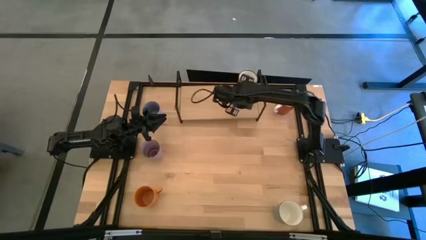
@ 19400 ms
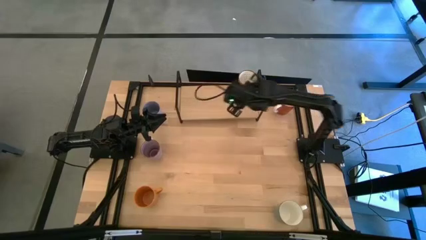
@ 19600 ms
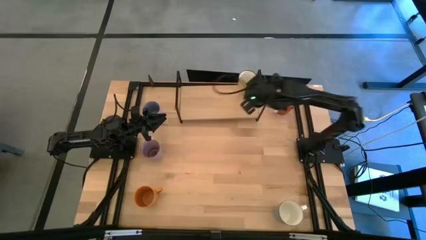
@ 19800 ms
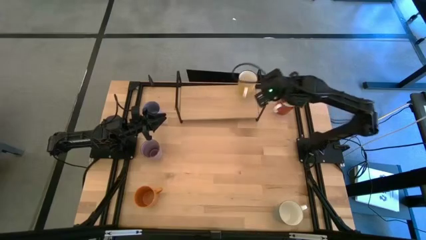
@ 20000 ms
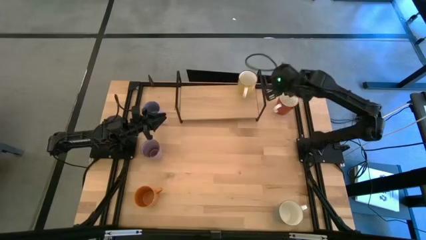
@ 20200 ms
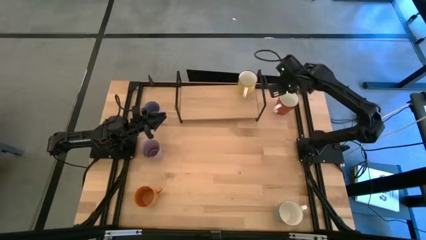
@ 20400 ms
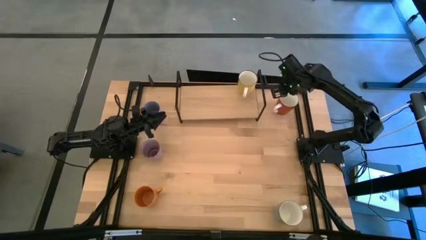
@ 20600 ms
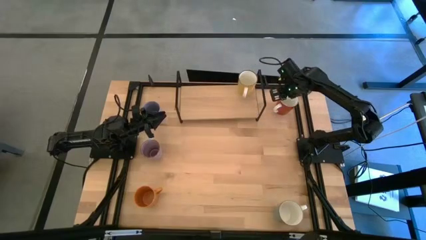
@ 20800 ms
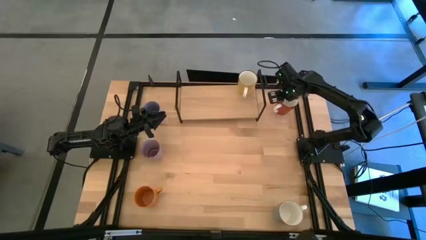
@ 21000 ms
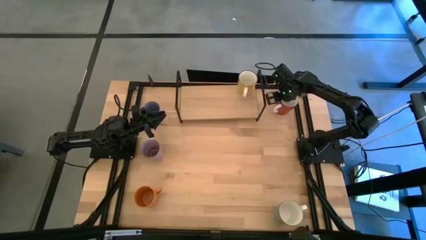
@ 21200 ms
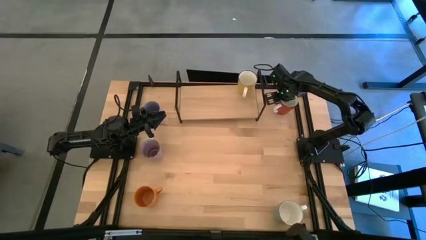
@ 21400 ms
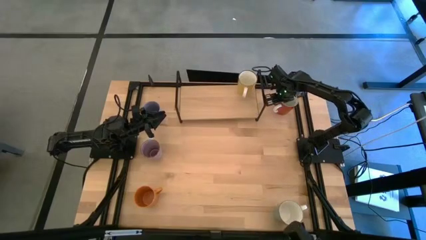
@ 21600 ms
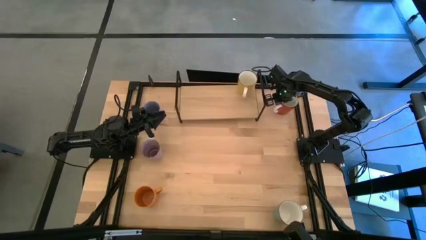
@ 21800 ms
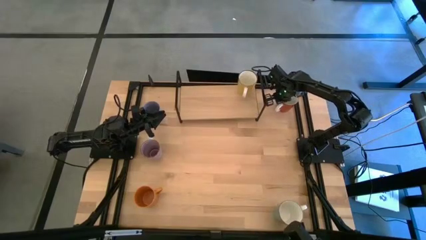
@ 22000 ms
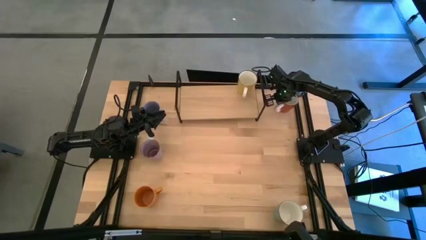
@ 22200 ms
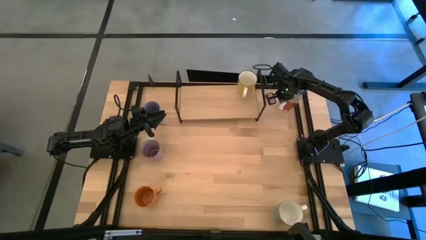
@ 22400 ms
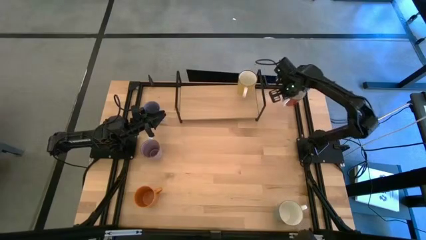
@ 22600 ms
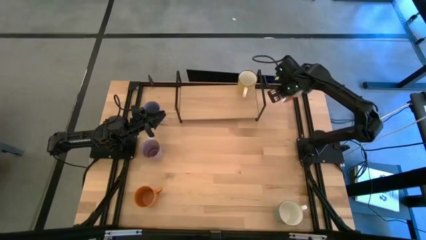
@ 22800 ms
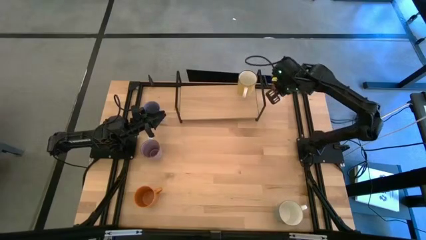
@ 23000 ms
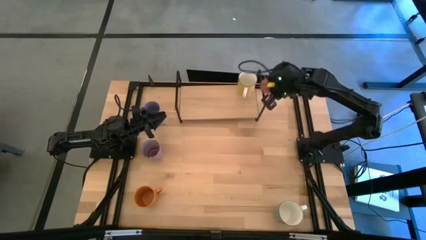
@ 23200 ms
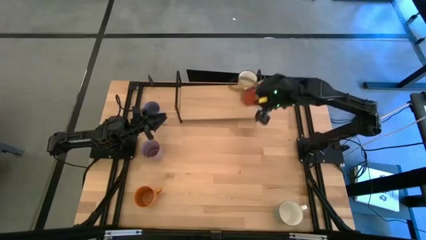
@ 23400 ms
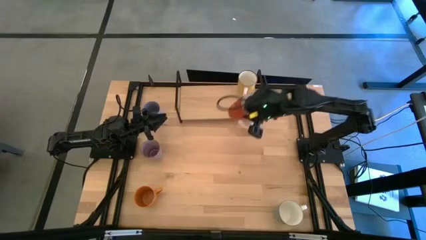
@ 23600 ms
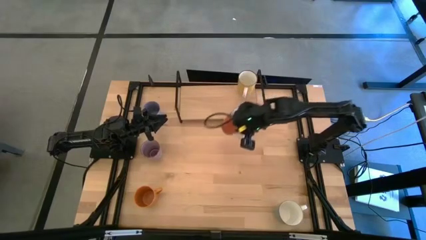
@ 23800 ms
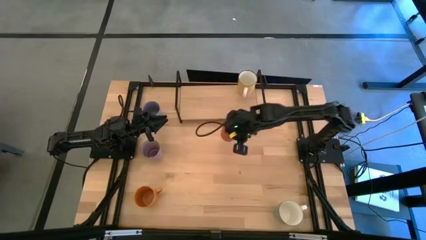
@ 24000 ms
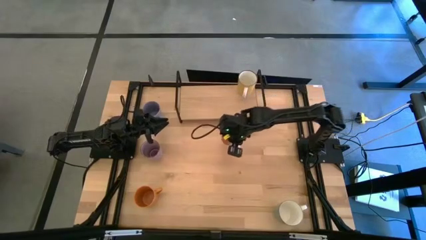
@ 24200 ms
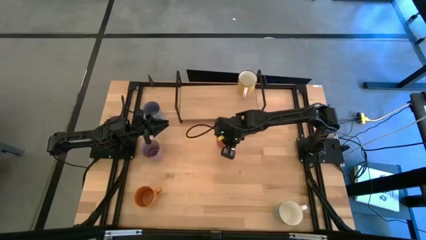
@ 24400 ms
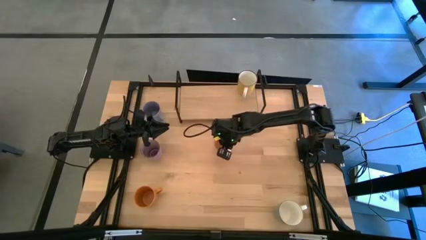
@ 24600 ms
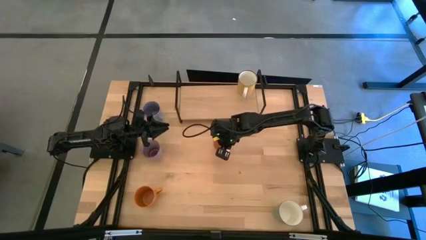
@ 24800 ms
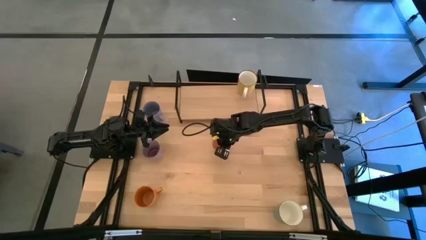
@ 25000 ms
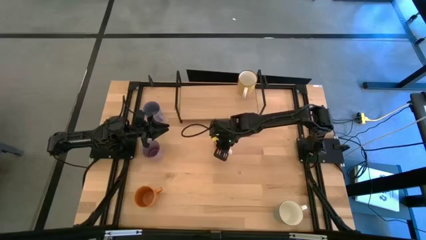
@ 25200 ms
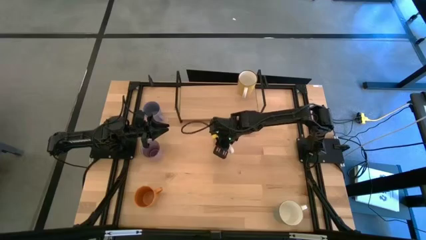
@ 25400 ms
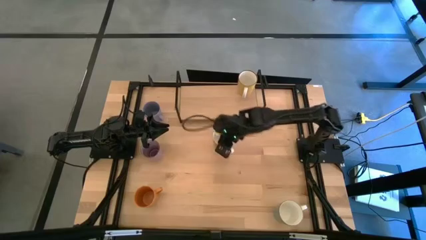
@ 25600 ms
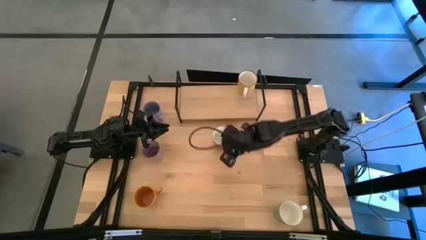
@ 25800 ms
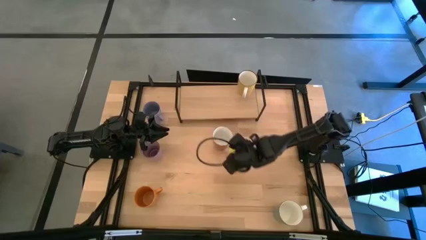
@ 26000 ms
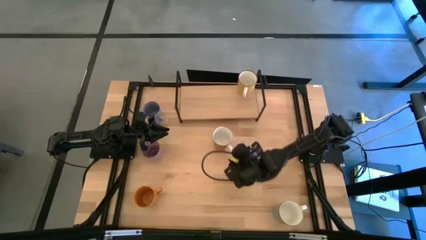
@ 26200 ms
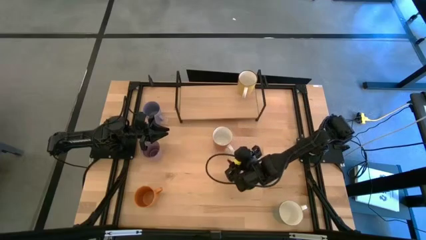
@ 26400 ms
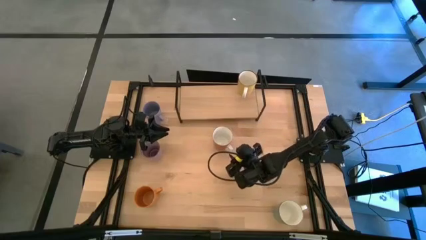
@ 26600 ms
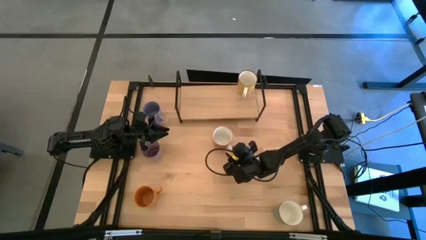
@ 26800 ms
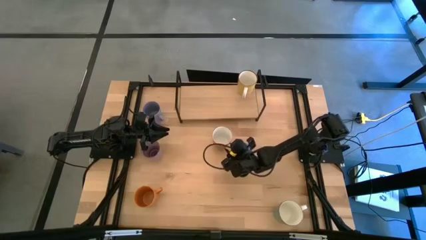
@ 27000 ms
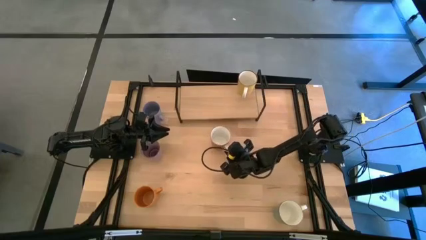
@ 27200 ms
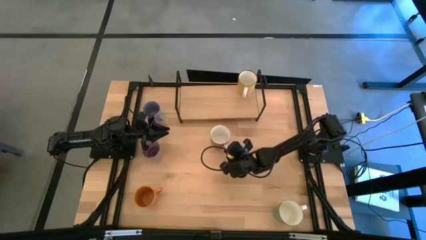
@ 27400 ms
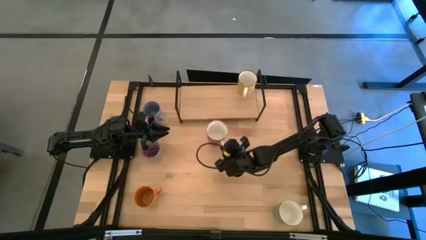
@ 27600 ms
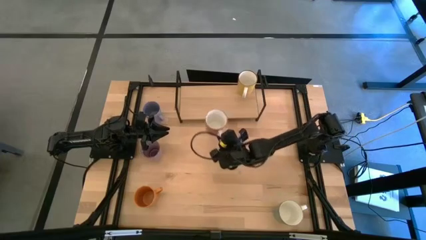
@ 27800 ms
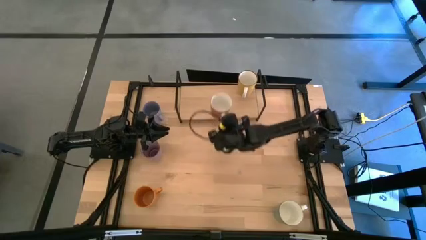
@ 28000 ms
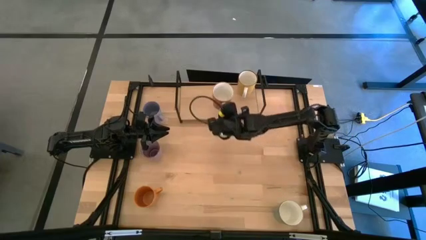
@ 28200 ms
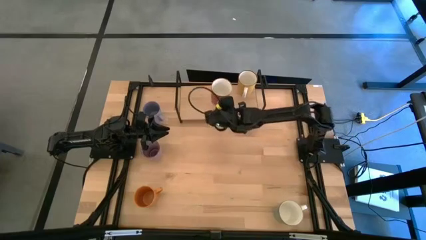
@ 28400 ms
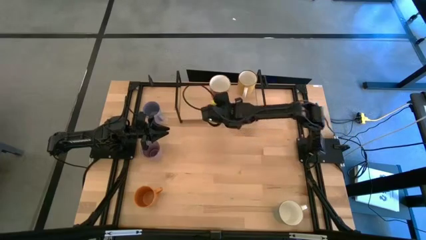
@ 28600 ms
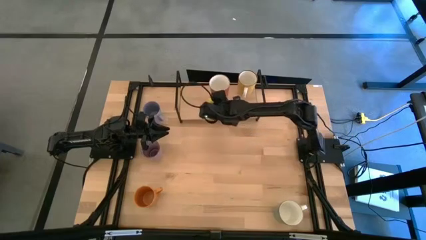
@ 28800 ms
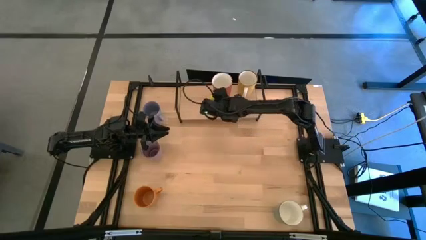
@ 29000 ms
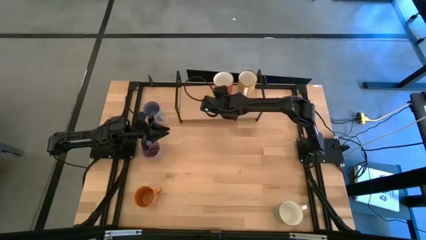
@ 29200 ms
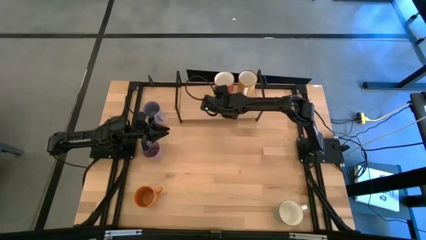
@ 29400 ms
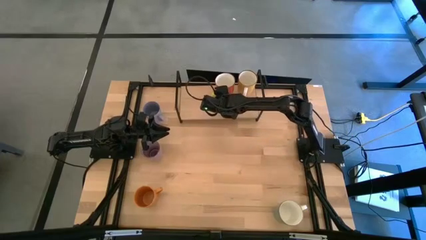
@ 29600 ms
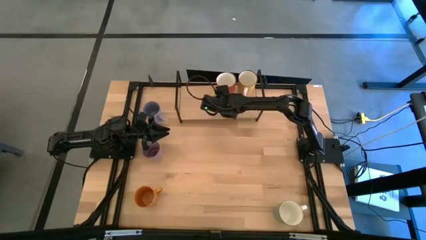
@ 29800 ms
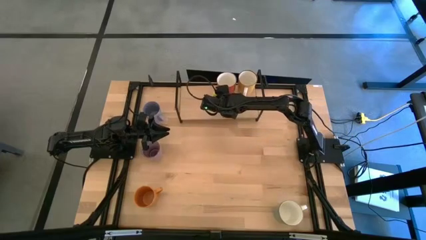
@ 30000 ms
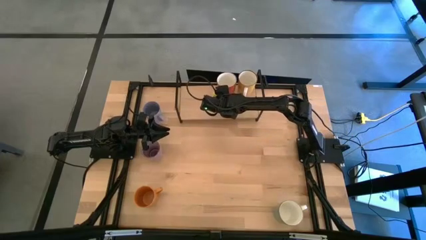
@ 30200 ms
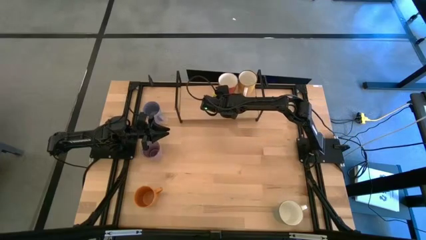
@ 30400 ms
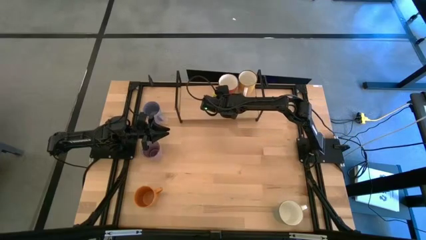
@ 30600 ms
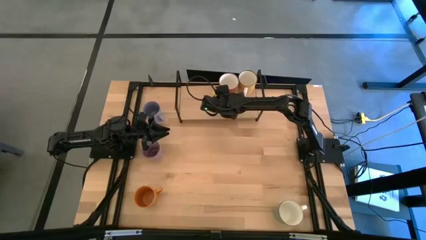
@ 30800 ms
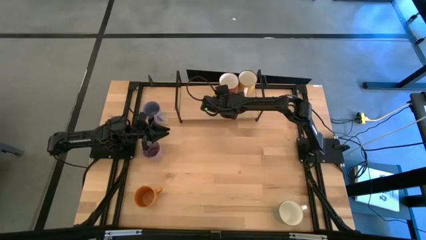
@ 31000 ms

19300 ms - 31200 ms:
Task: Place coffee mugs
Put the orange white mug on the shelf
